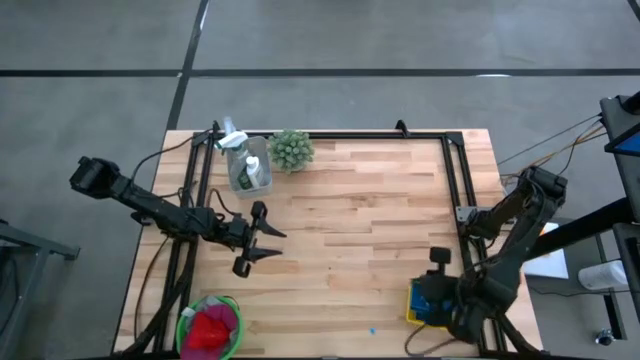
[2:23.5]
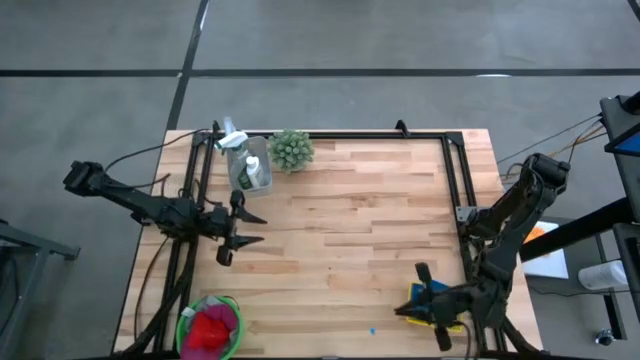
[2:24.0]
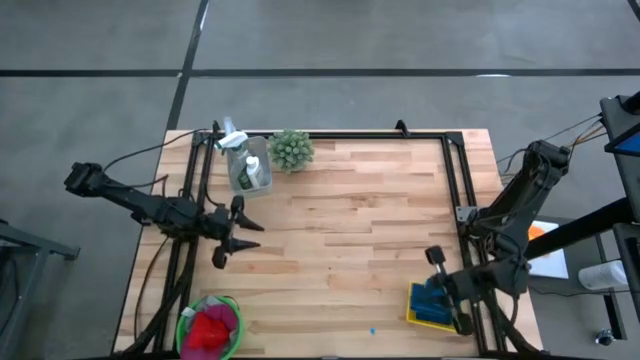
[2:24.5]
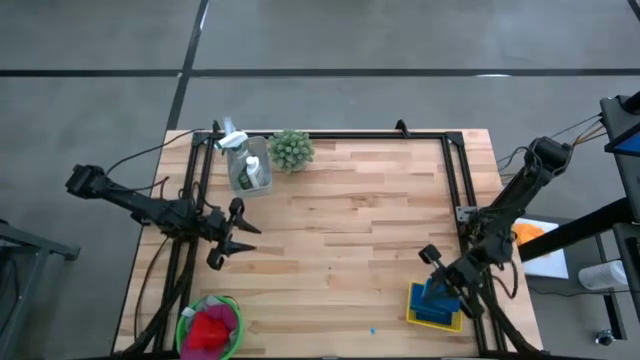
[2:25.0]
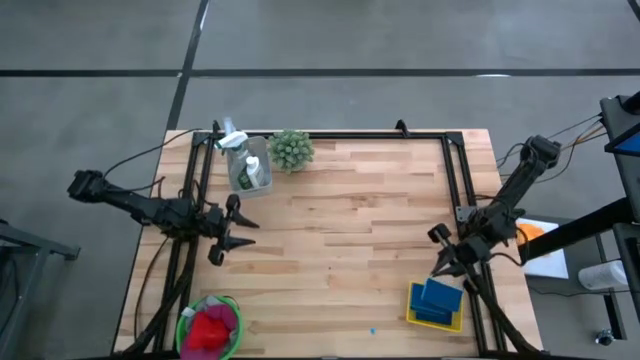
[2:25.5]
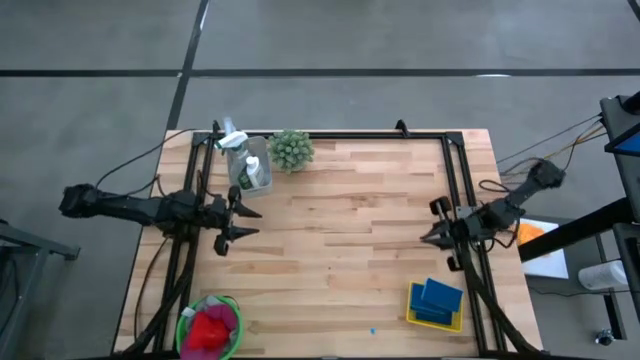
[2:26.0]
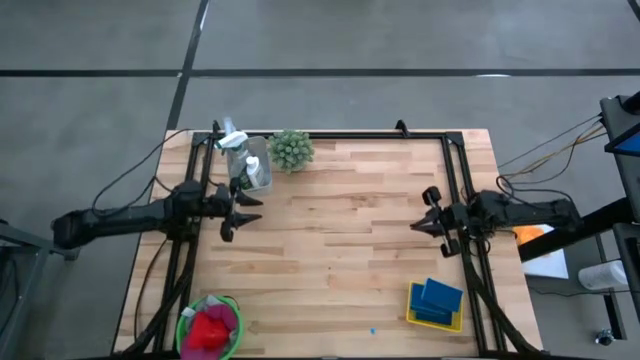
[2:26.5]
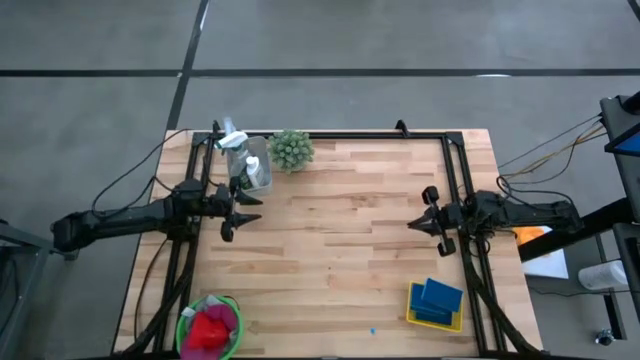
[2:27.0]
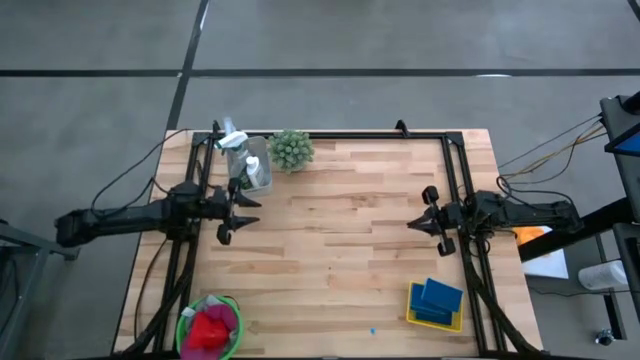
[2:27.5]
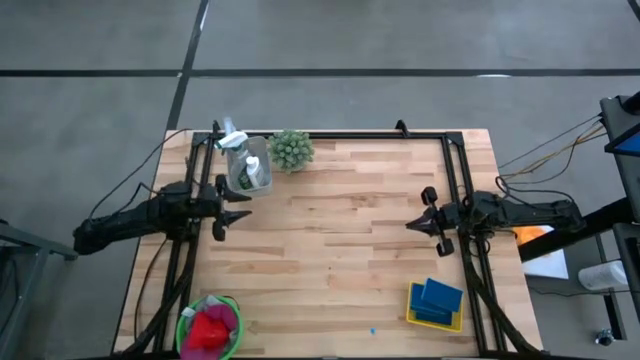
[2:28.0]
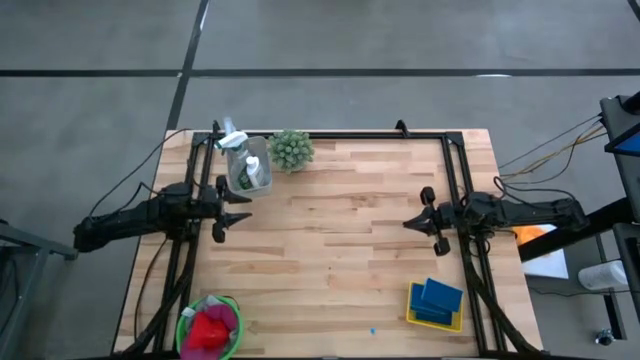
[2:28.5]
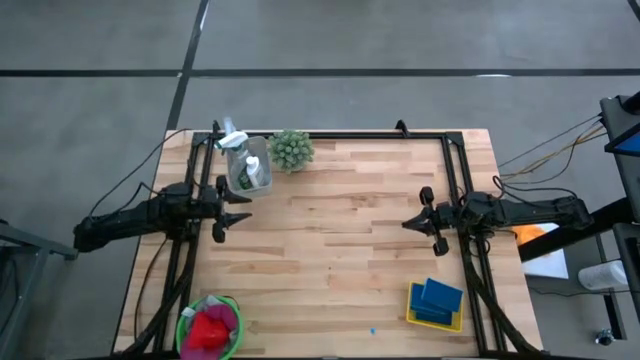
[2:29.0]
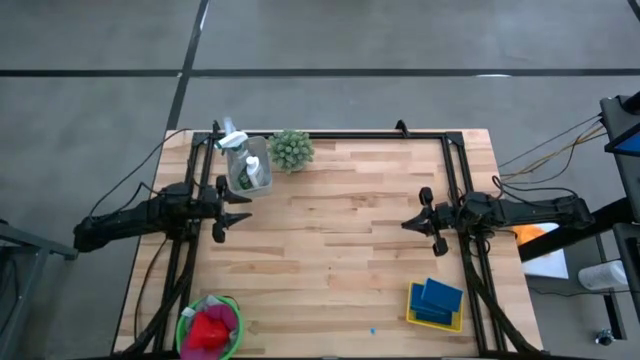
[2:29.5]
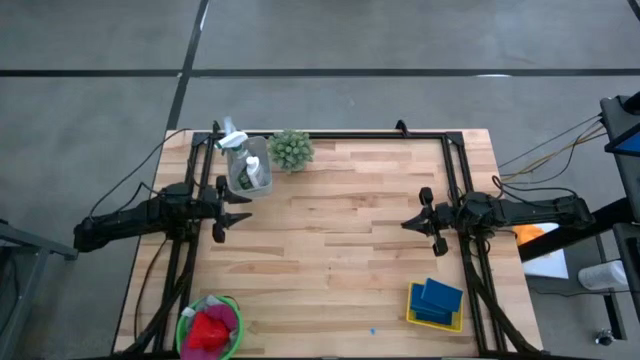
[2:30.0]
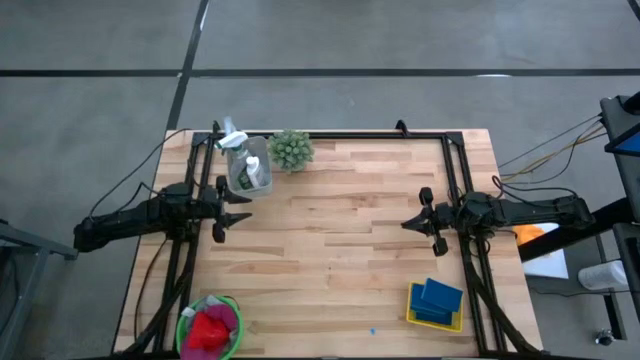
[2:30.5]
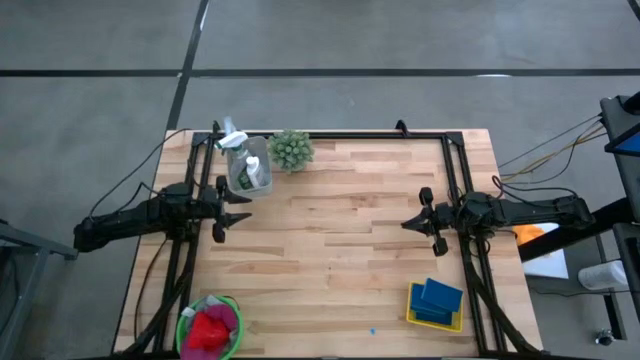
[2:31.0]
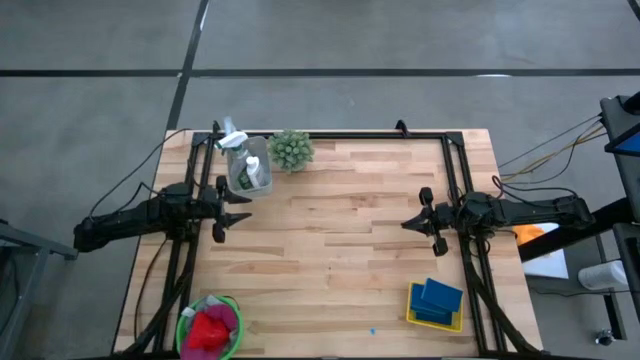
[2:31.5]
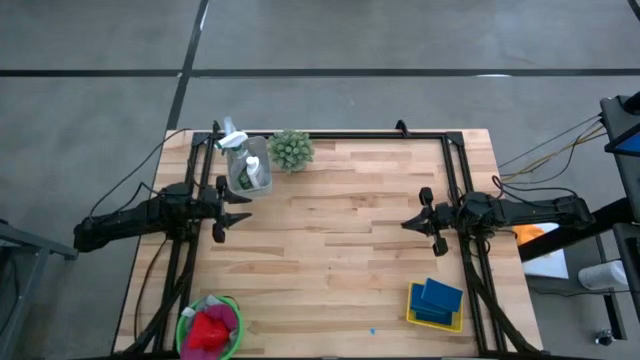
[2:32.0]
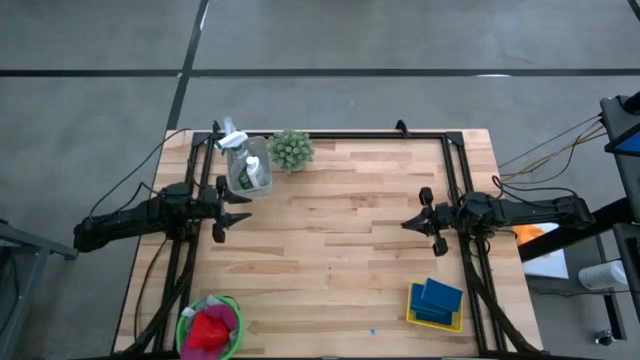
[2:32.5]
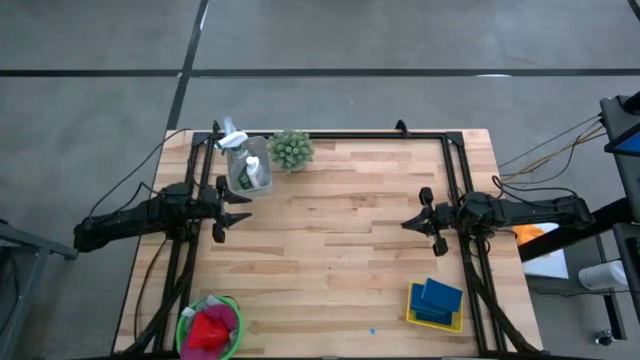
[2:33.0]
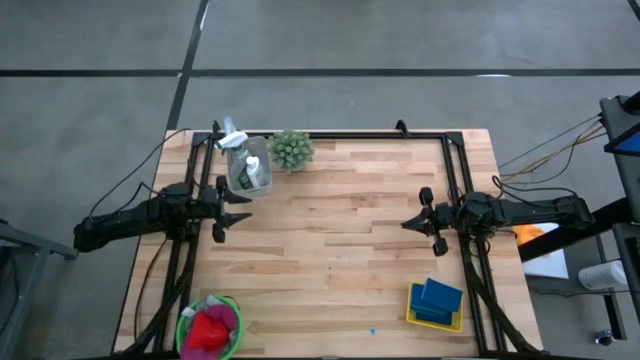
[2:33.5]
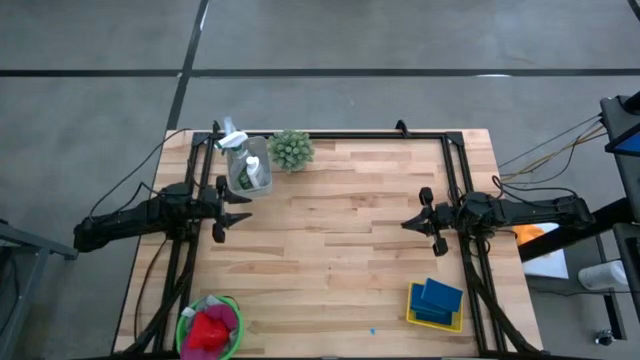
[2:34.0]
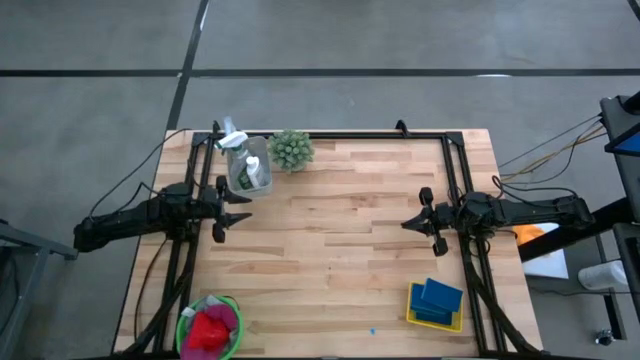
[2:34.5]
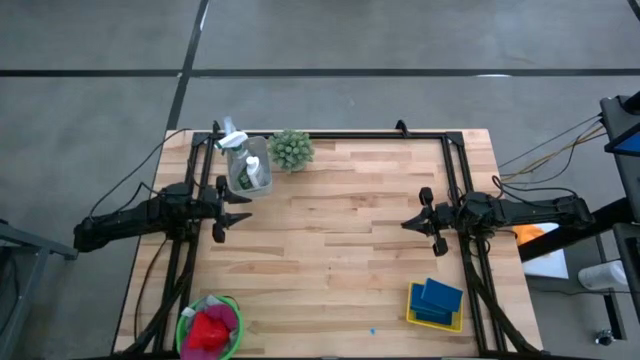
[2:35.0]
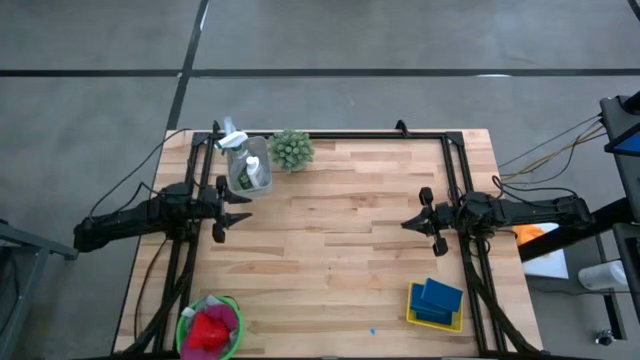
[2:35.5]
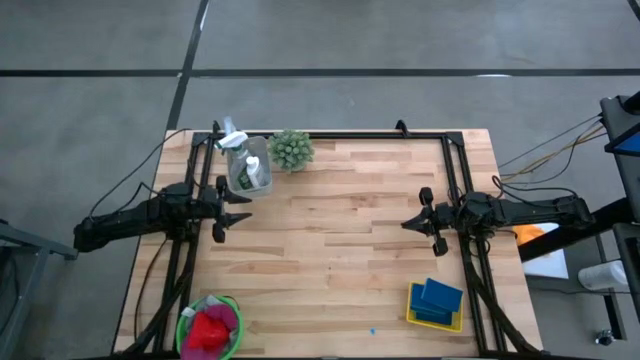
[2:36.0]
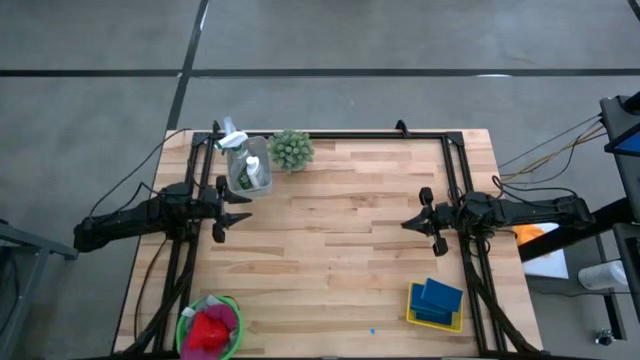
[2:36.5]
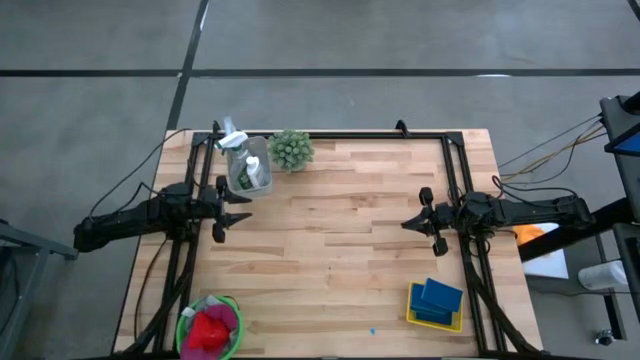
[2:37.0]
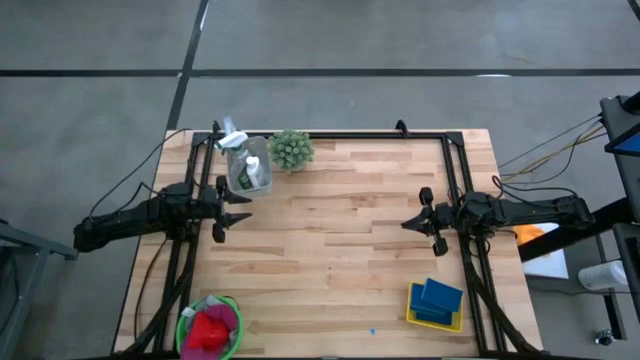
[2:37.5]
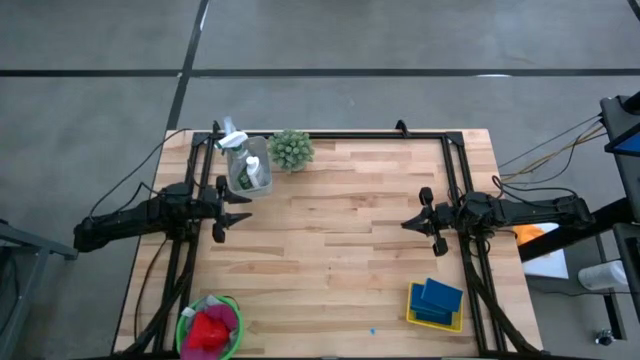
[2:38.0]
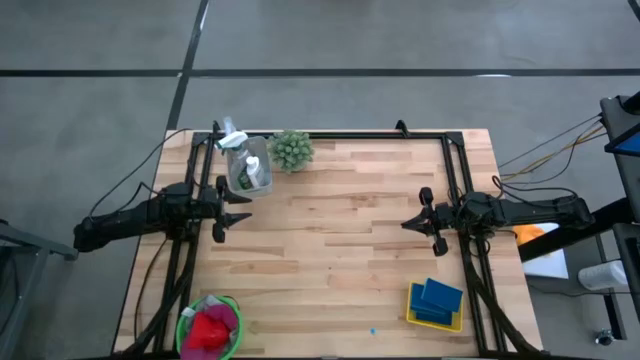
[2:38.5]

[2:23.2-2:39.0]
Task: Pick & Place Kitchen Items
Return to Home Position

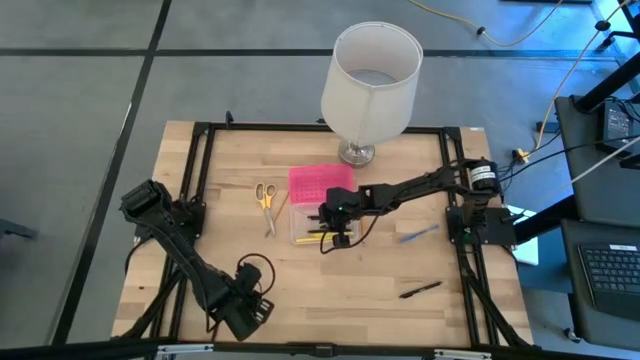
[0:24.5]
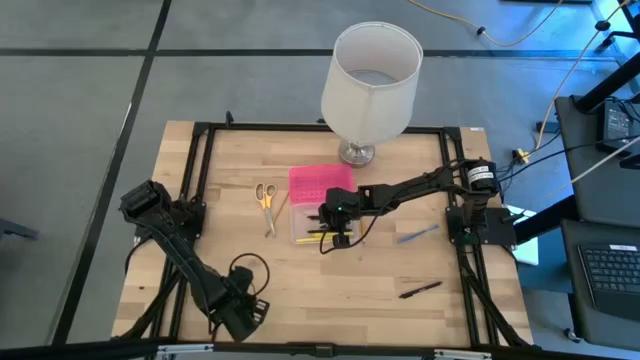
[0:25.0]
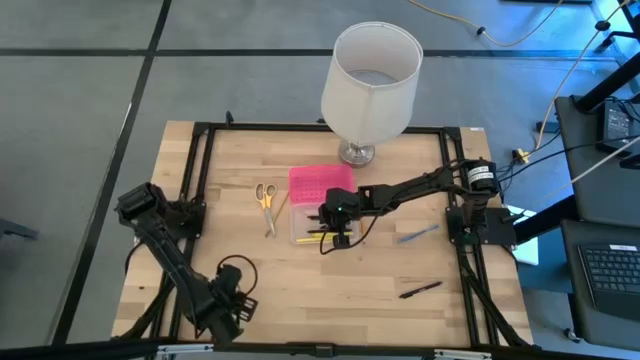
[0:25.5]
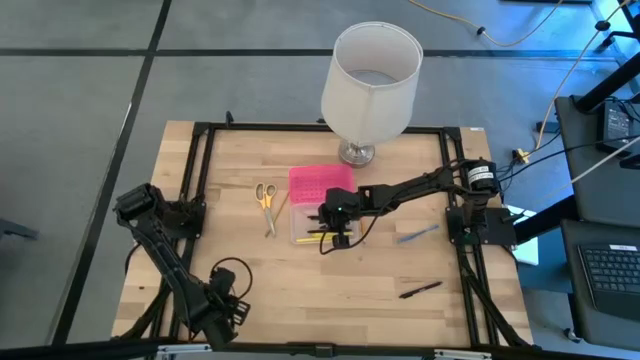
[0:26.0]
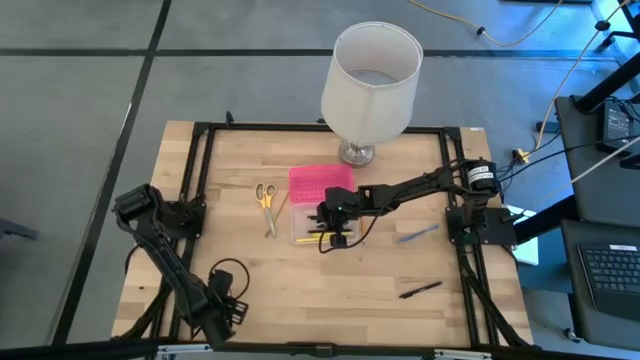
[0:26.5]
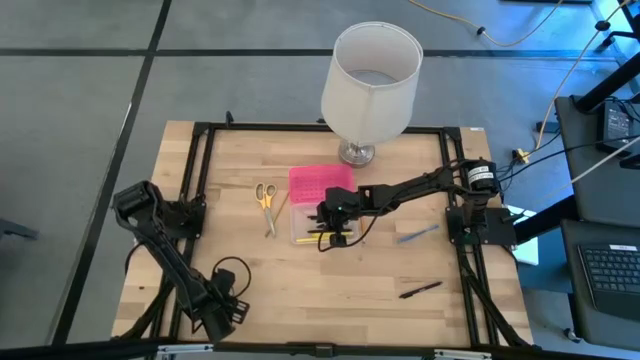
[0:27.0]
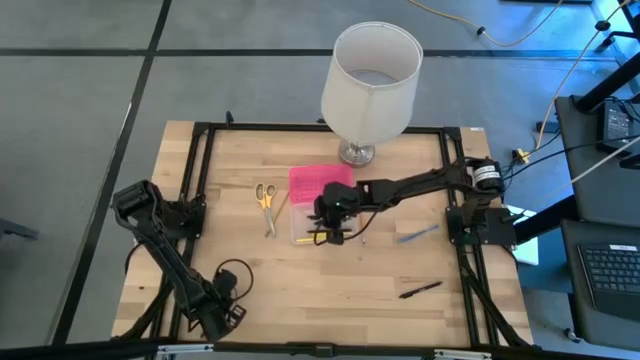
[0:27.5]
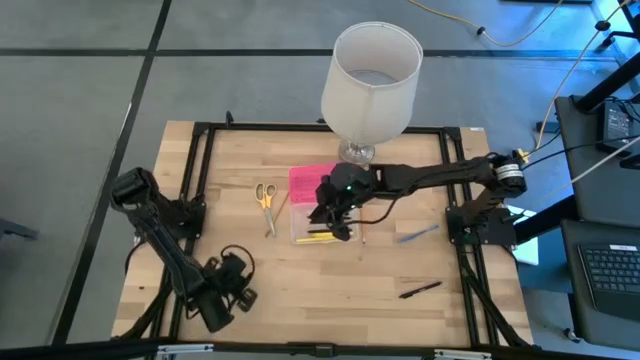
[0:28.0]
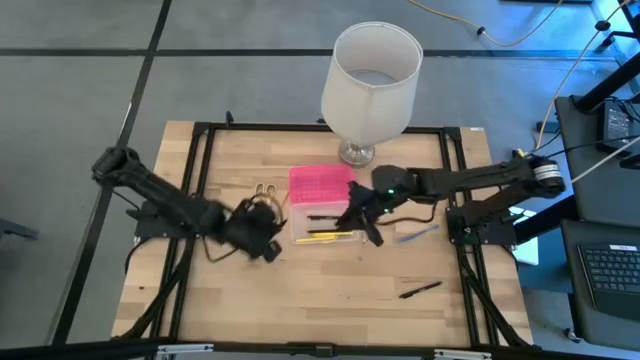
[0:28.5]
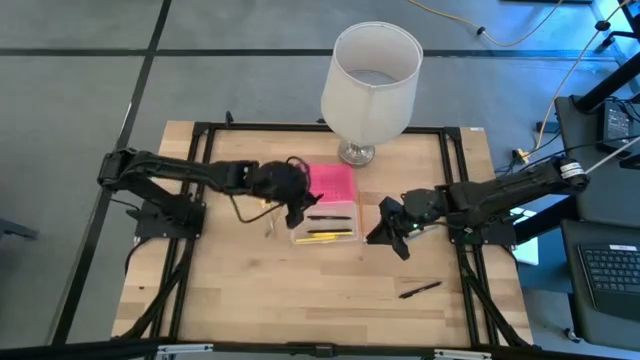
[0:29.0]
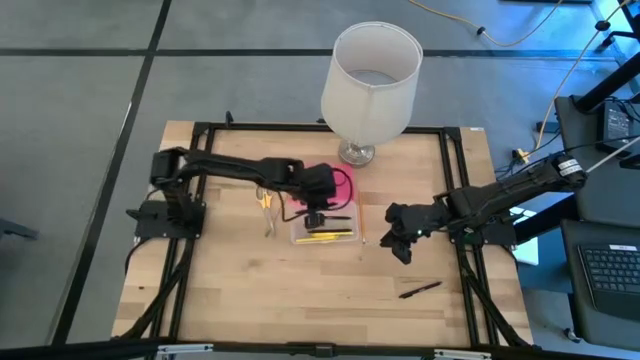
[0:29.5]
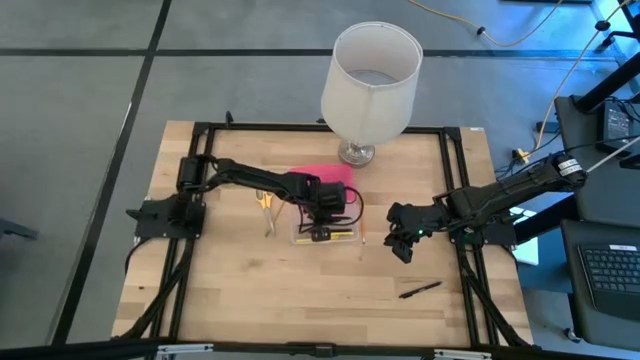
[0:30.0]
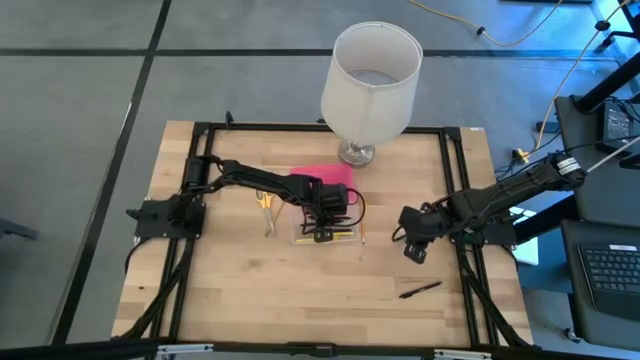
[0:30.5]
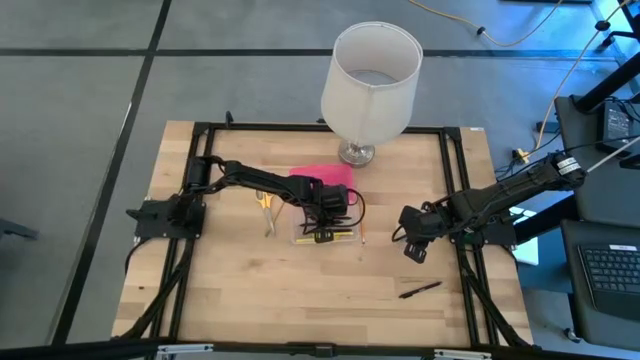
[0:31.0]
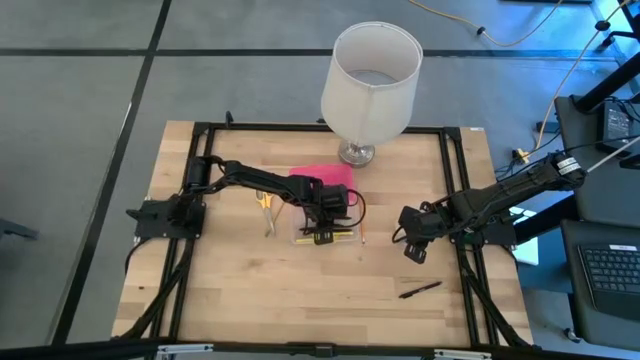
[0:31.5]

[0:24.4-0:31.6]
Task: Pick & place school supplies into a supply box
Put the black pen into the supply box
